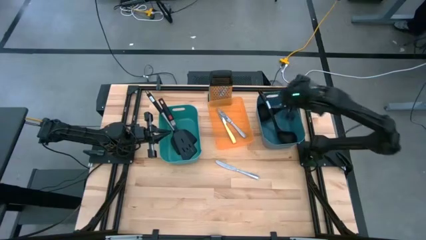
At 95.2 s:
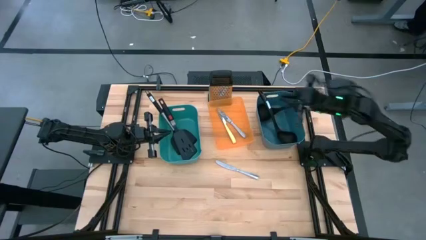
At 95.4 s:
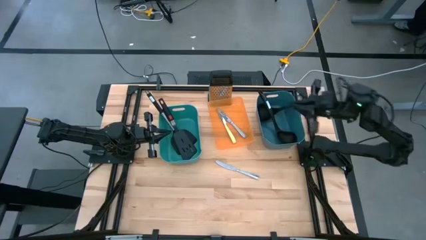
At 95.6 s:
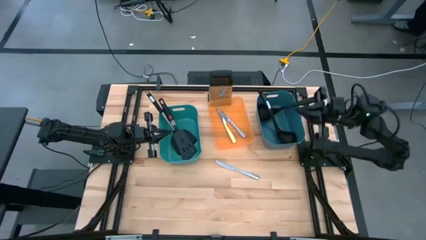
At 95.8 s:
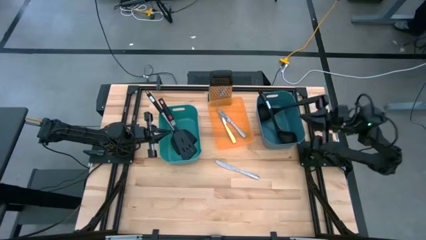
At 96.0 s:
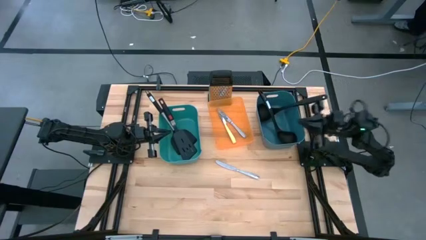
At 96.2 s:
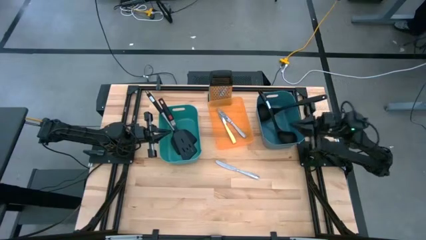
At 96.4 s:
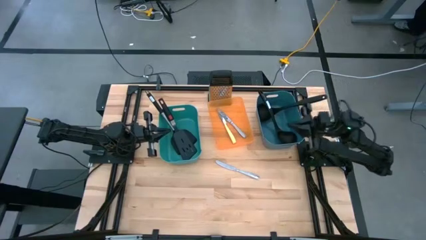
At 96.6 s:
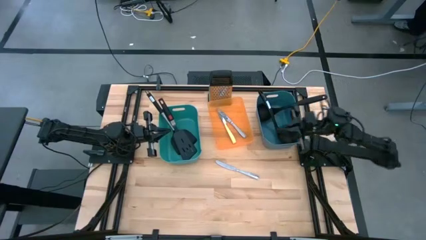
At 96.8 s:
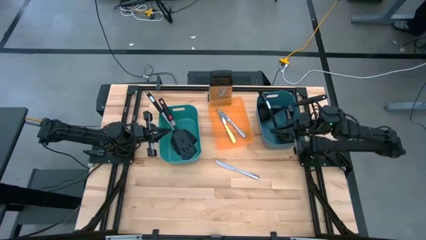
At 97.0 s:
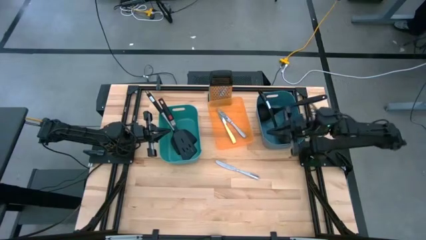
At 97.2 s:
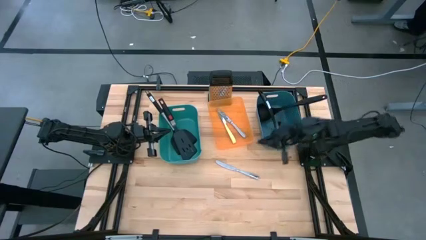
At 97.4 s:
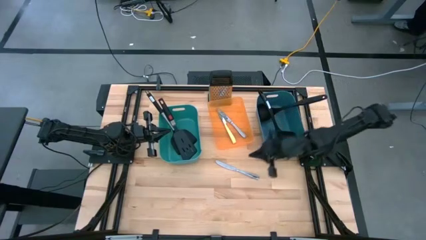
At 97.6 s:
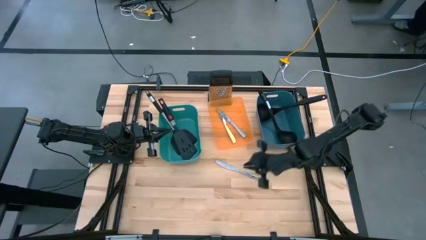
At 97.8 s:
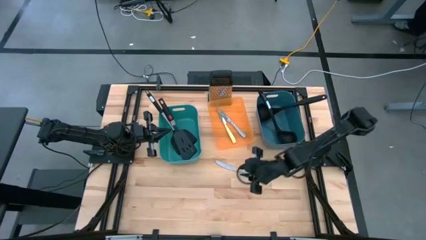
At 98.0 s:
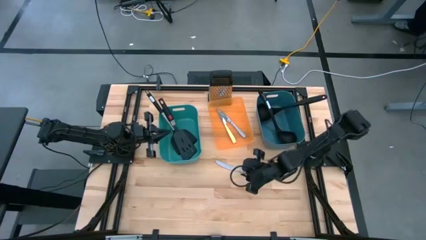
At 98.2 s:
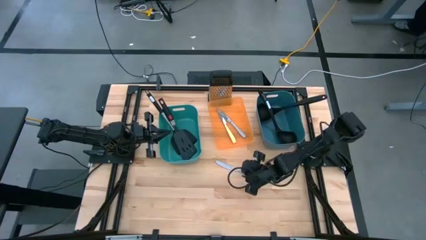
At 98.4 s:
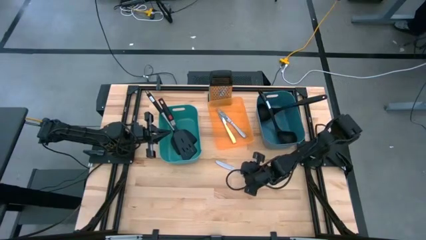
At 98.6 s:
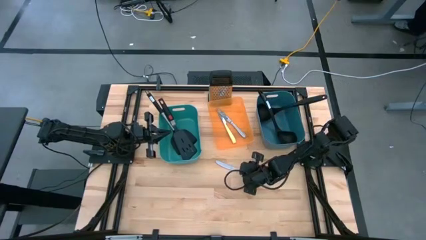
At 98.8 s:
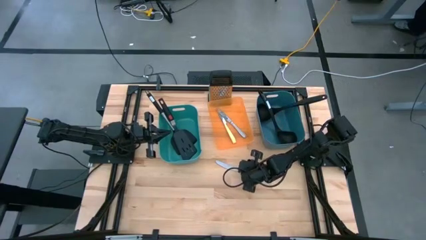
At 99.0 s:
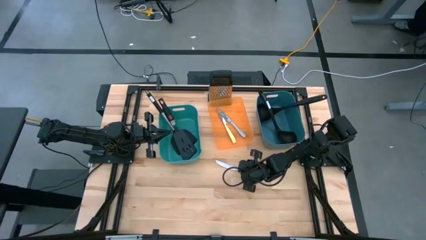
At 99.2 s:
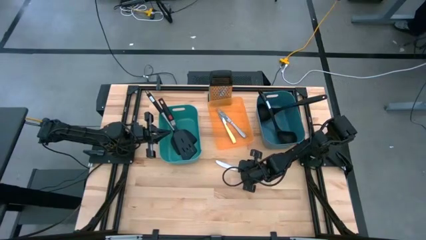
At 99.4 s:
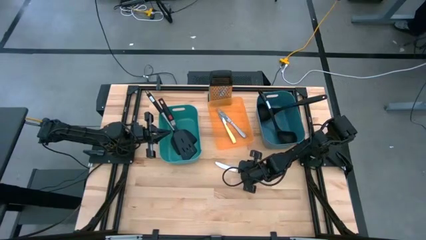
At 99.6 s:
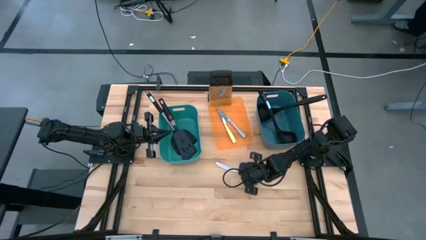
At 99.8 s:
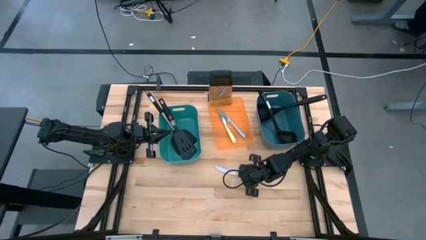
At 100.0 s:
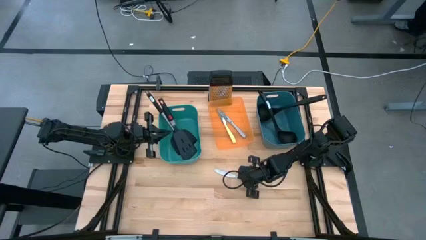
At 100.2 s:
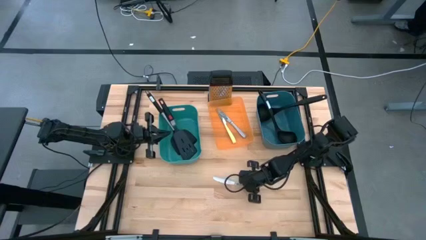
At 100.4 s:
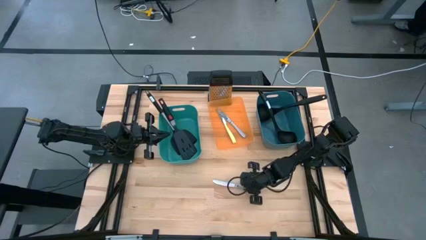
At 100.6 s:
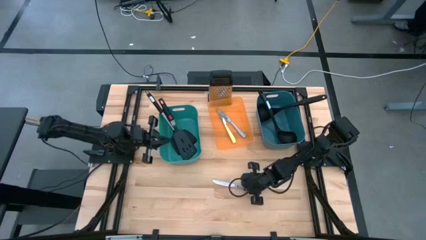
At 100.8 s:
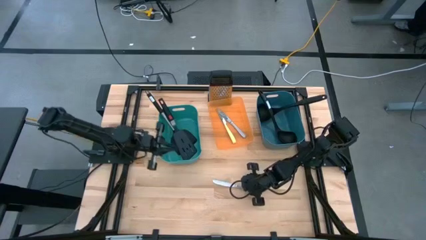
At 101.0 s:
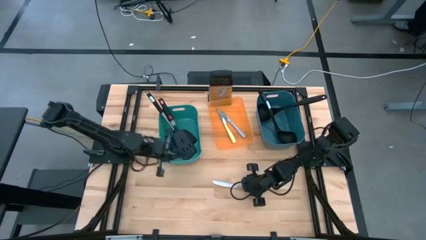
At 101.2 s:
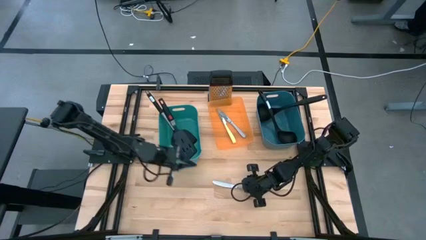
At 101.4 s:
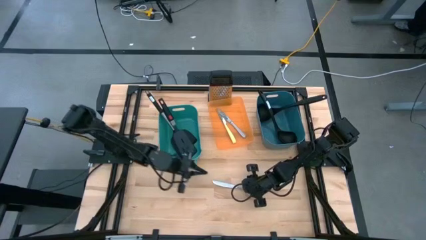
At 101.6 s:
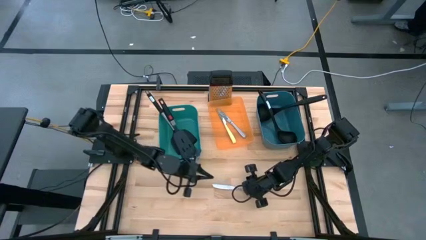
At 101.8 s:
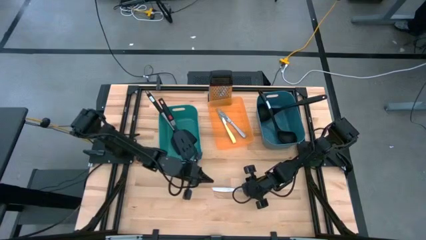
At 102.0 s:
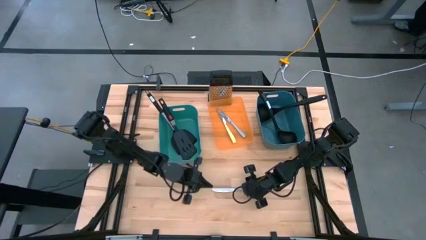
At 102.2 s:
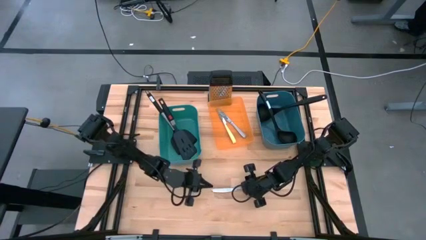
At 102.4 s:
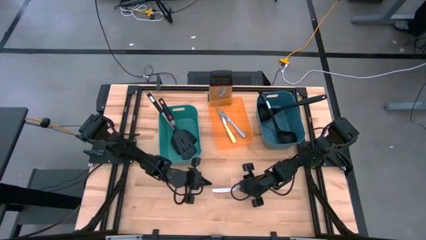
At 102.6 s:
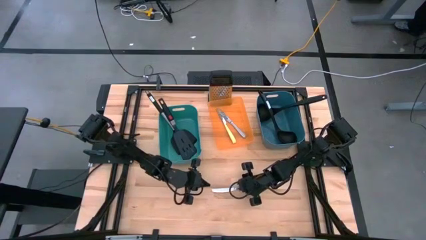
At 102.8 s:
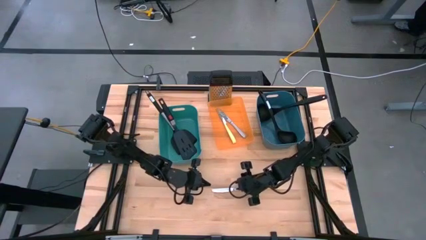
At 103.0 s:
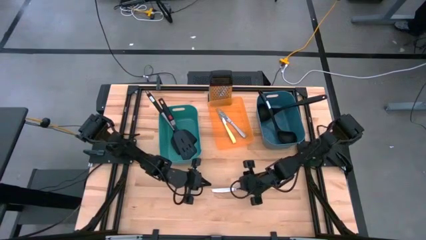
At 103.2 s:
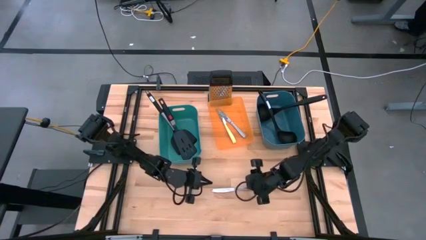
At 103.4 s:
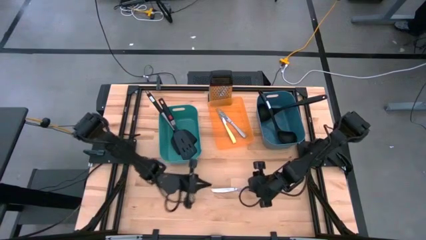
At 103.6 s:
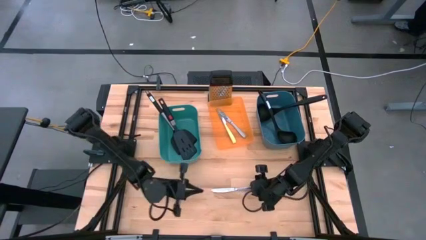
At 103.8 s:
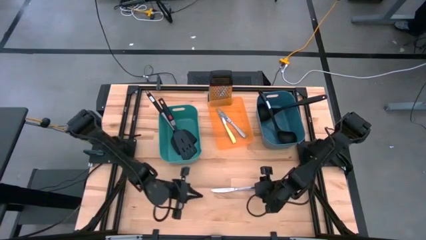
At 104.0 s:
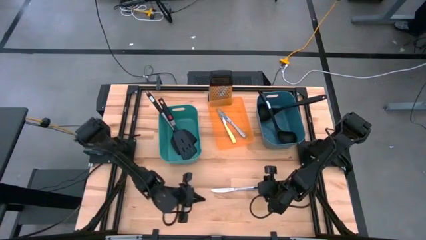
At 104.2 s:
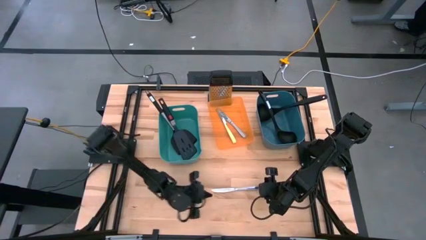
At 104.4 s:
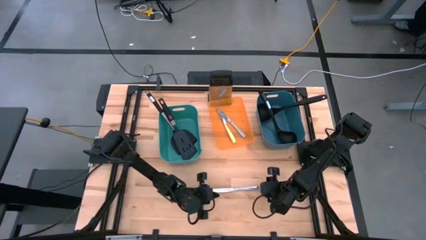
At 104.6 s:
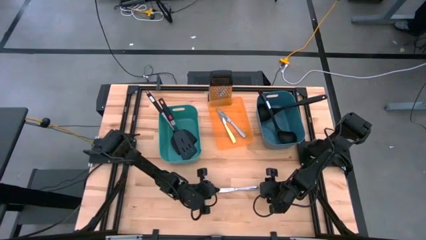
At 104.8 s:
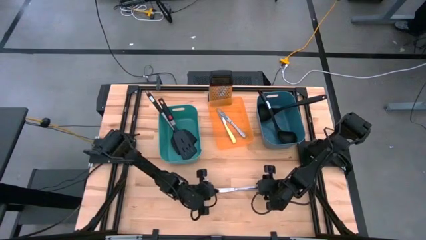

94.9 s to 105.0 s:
Task: Pick & Place Kitchen Items
Put the silver knife into the orange bin

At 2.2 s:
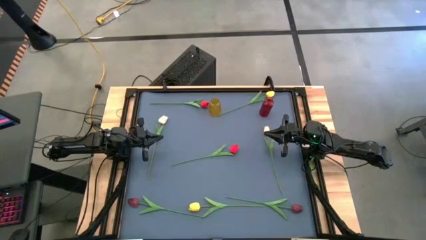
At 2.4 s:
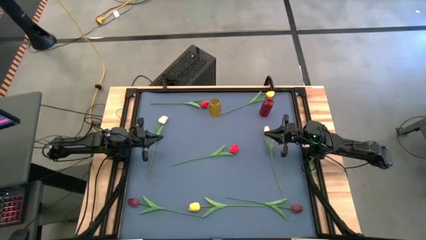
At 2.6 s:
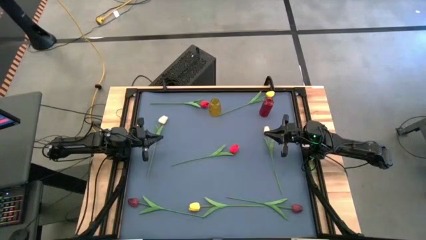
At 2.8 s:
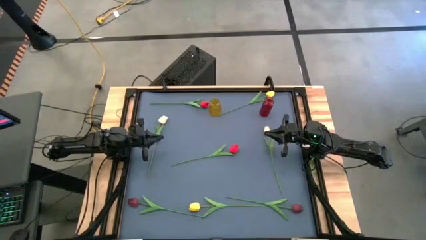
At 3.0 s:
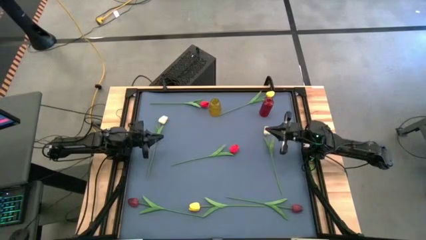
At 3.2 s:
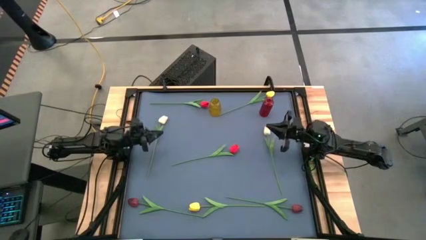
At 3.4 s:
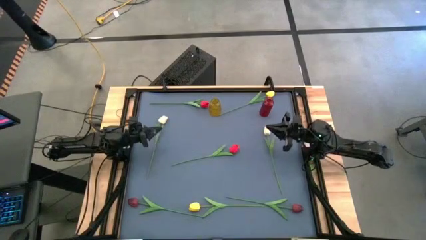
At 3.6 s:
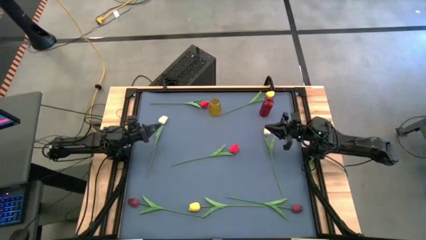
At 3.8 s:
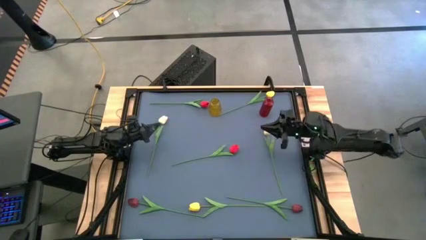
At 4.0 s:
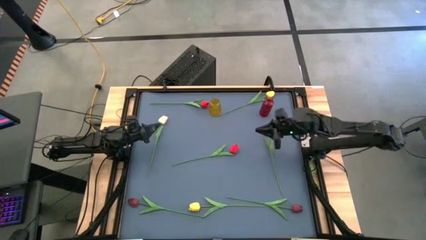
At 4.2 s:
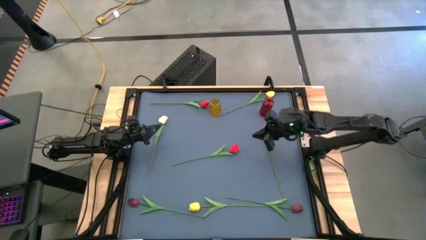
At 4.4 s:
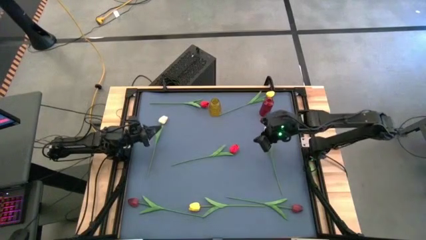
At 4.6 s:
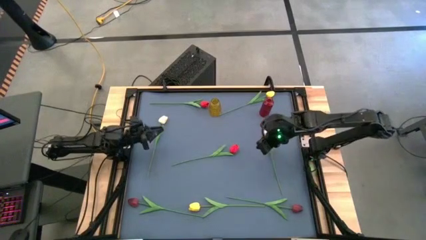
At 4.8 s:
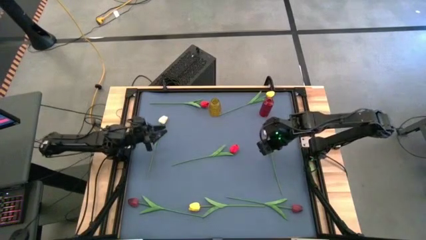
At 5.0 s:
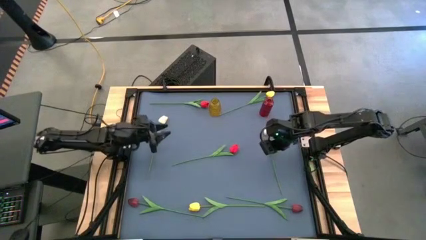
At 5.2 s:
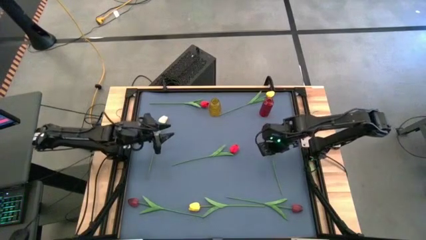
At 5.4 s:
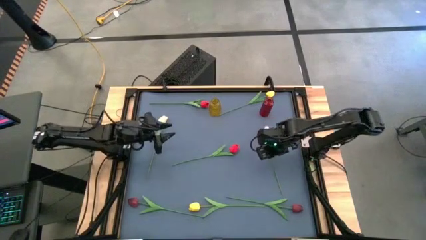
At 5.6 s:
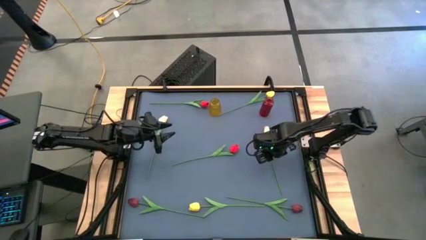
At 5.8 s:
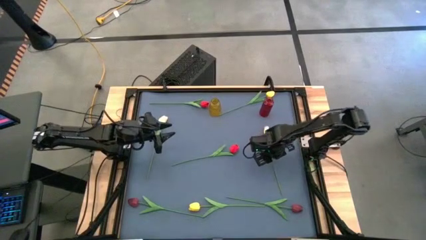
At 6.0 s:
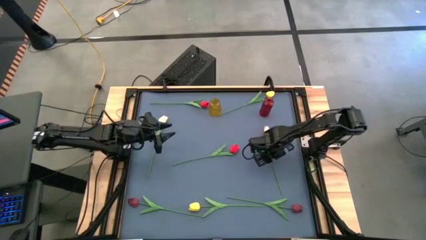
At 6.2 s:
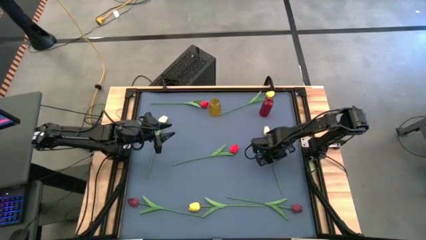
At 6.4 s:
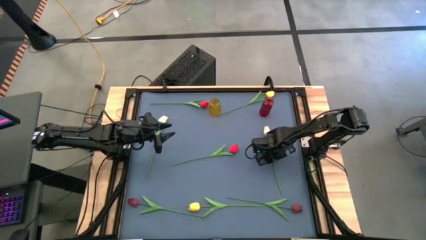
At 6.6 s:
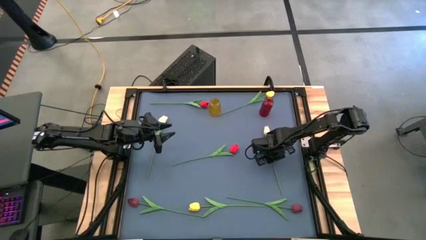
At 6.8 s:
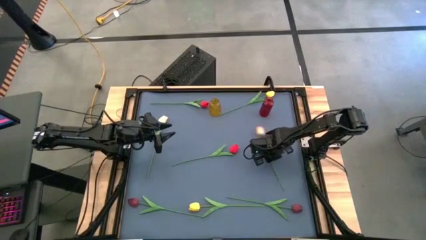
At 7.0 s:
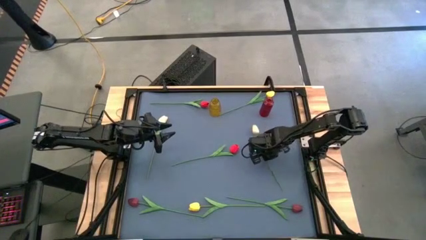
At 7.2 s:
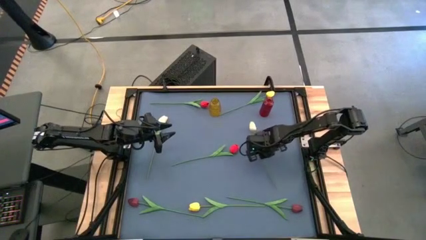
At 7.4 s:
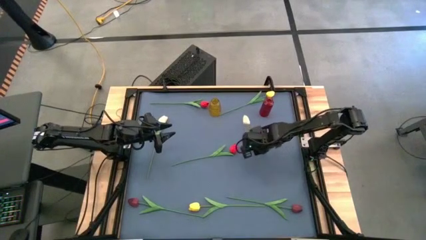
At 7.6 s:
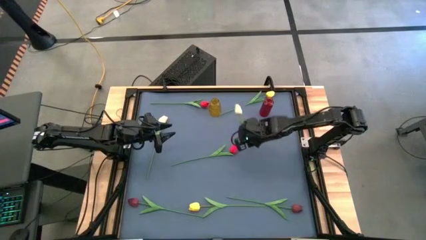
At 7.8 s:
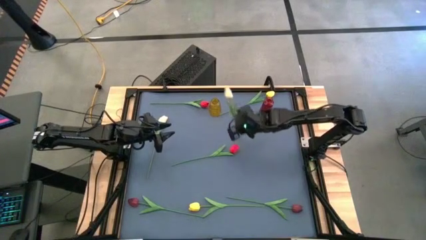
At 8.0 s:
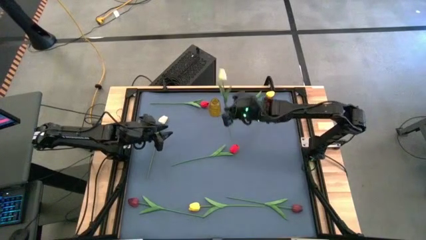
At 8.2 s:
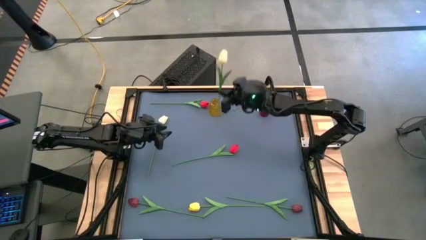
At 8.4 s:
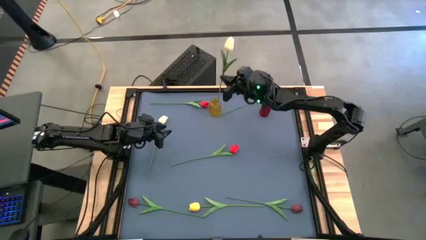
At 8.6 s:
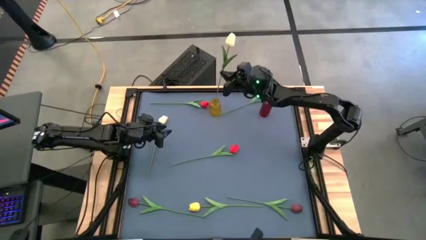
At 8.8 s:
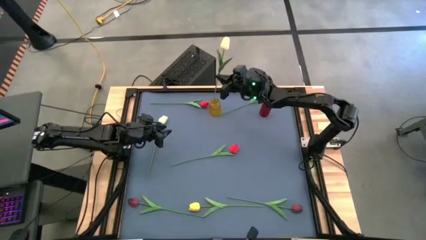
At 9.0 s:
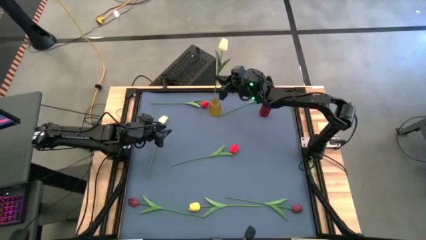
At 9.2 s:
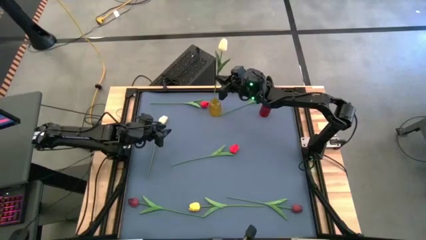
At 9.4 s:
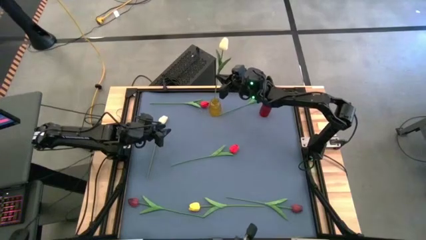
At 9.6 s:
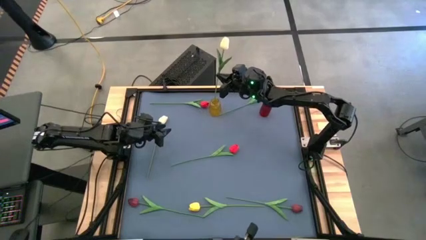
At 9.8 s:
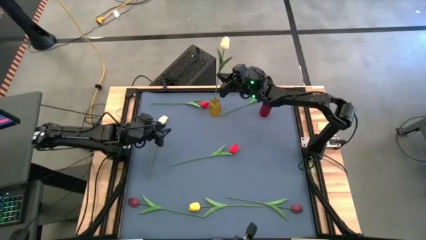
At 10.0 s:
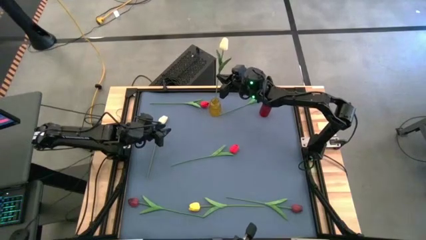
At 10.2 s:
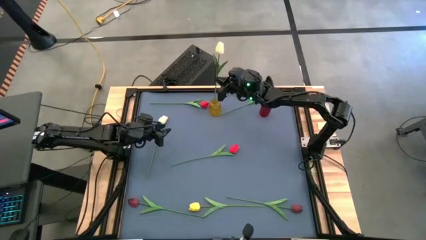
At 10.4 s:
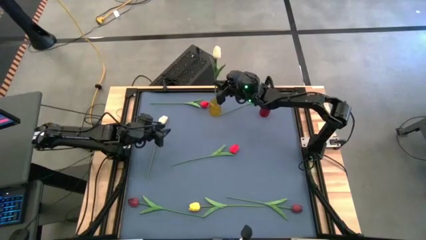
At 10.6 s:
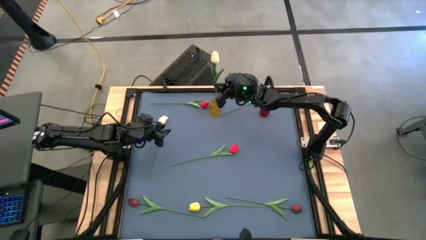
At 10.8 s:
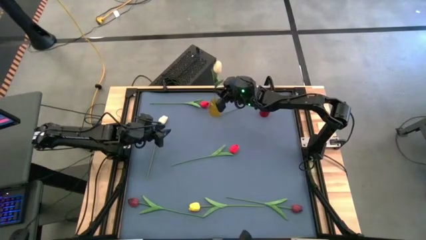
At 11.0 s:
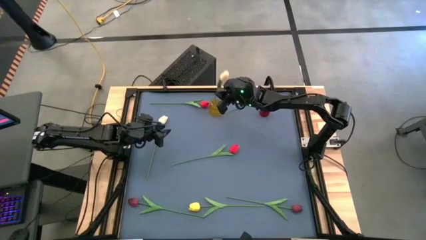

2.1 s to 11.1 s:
Task: Sort flowers into vase by color
Put the right white flower into the yellow vase
